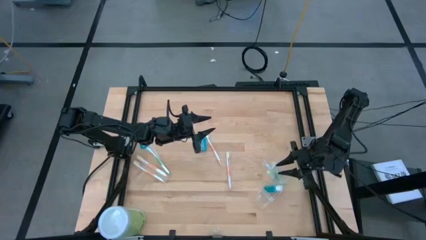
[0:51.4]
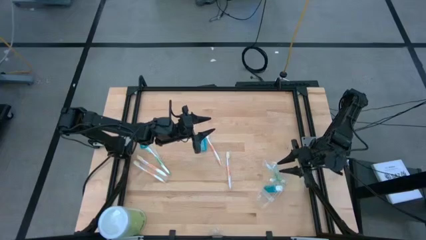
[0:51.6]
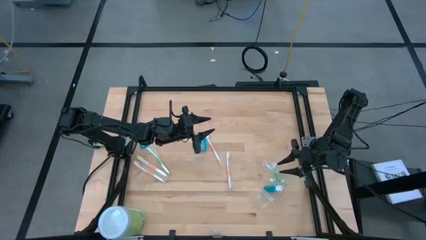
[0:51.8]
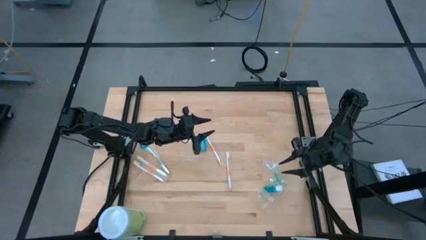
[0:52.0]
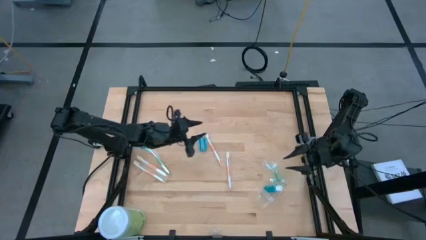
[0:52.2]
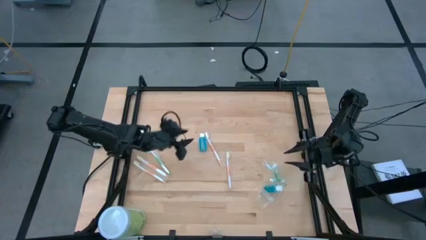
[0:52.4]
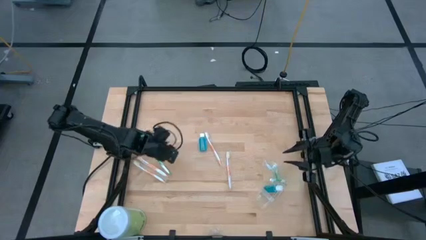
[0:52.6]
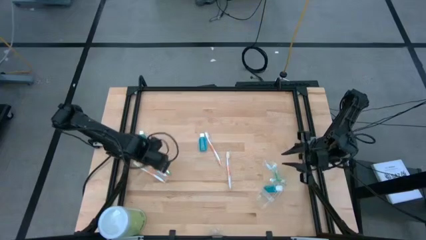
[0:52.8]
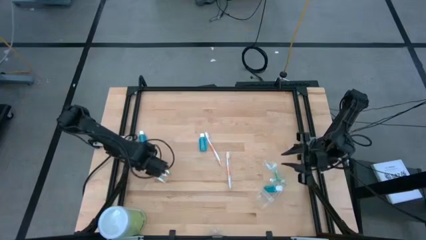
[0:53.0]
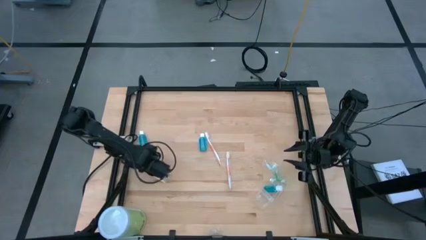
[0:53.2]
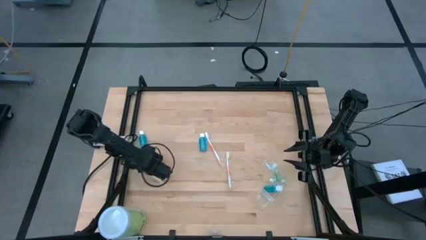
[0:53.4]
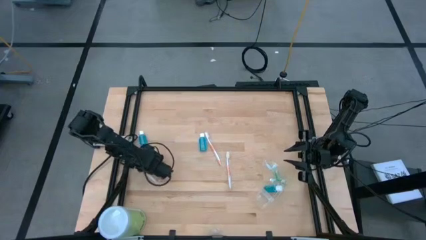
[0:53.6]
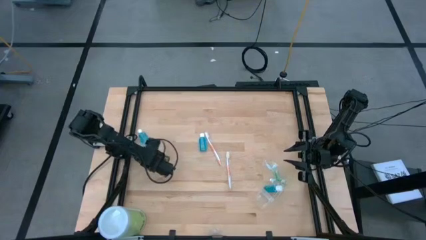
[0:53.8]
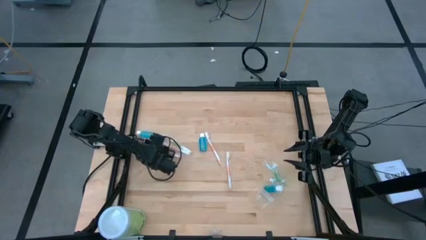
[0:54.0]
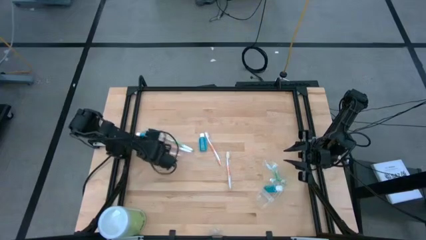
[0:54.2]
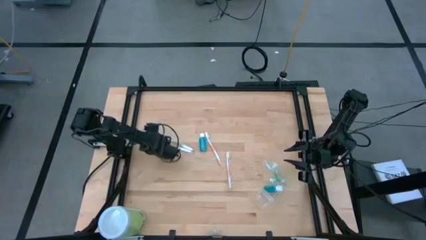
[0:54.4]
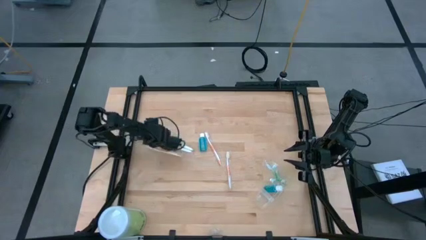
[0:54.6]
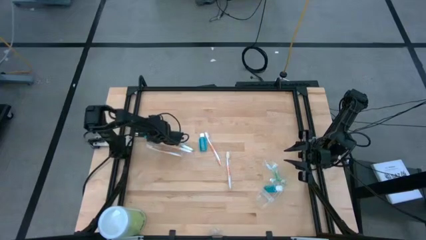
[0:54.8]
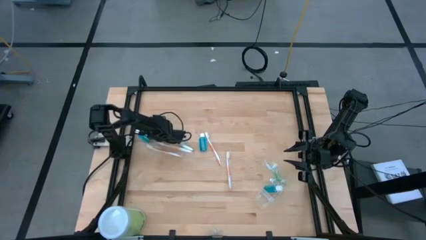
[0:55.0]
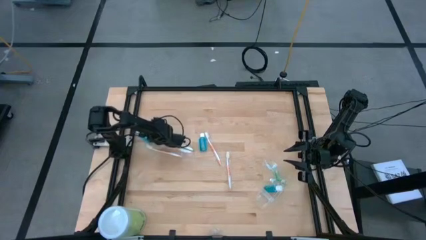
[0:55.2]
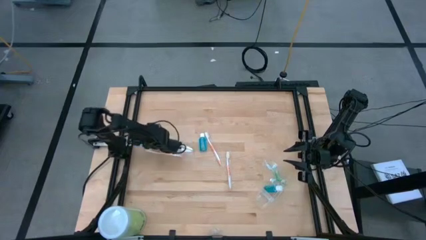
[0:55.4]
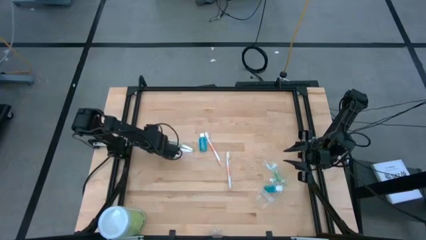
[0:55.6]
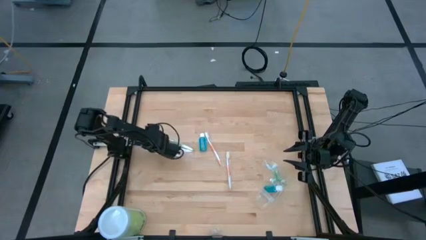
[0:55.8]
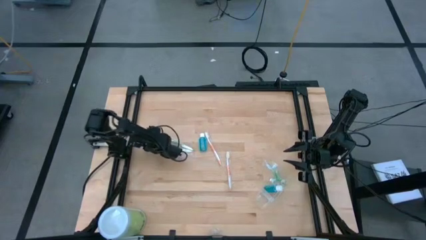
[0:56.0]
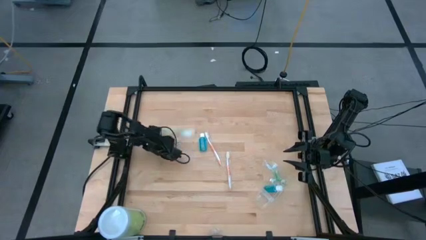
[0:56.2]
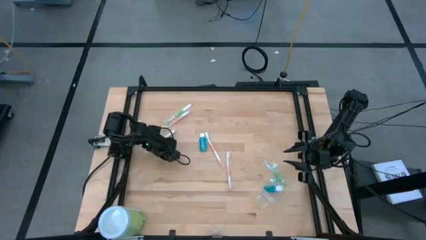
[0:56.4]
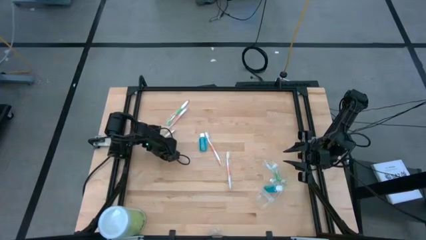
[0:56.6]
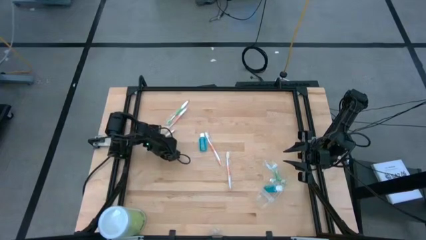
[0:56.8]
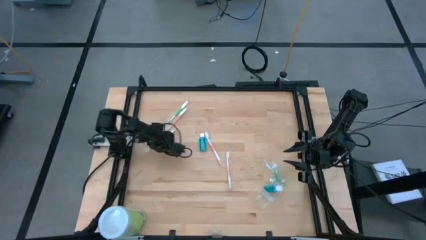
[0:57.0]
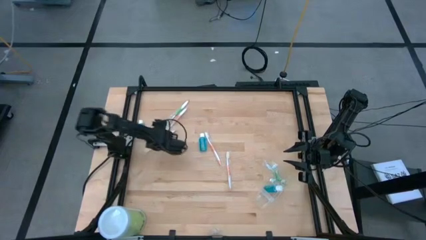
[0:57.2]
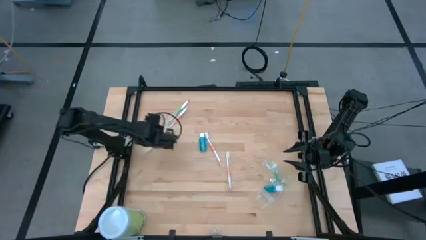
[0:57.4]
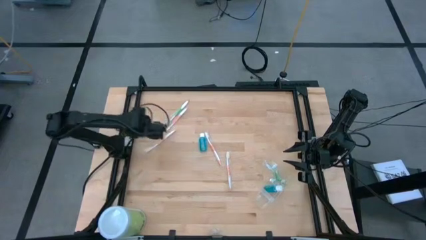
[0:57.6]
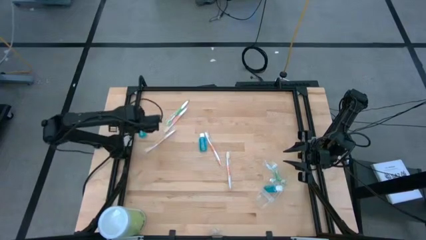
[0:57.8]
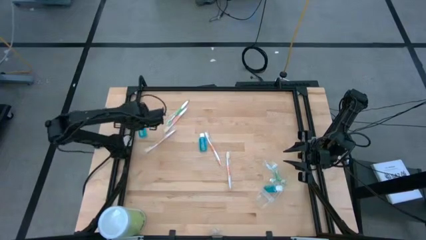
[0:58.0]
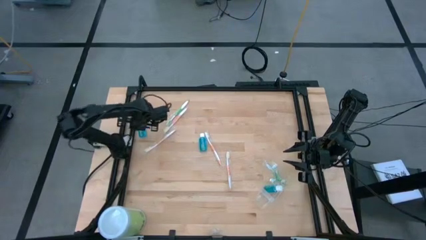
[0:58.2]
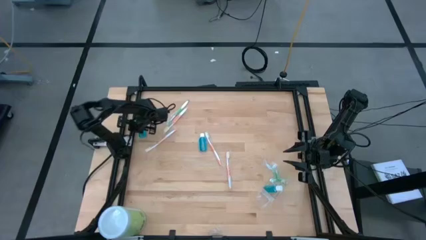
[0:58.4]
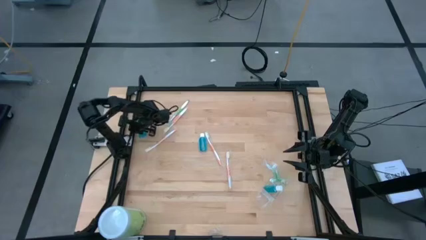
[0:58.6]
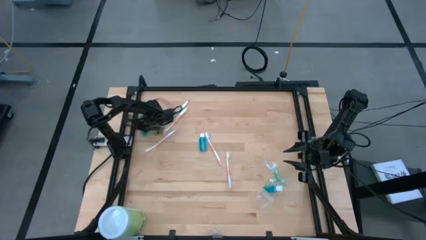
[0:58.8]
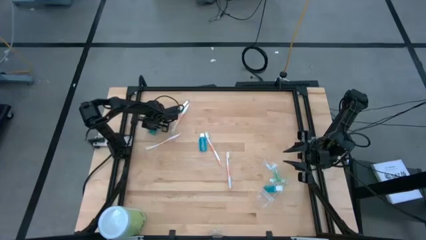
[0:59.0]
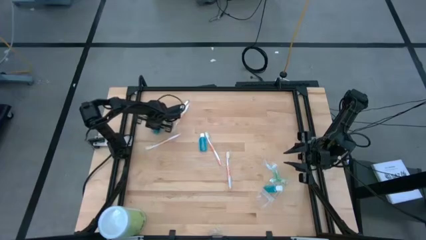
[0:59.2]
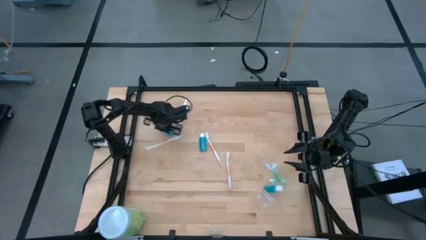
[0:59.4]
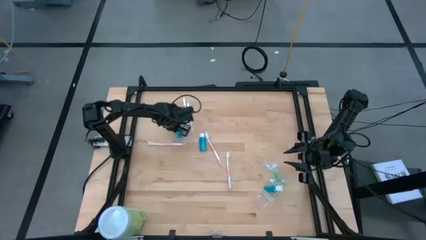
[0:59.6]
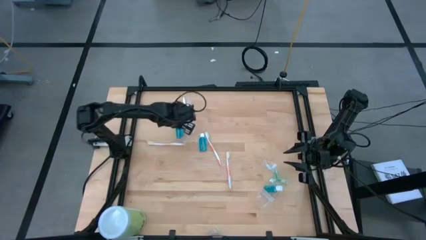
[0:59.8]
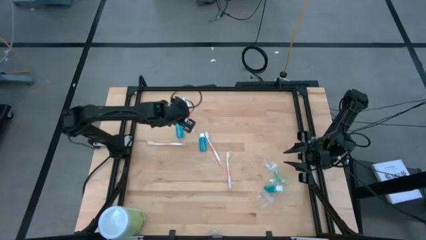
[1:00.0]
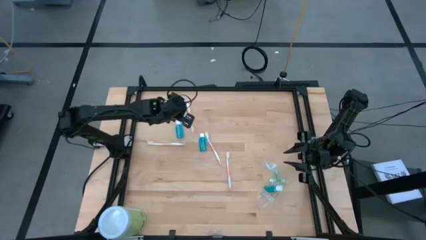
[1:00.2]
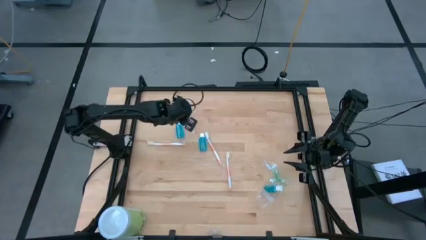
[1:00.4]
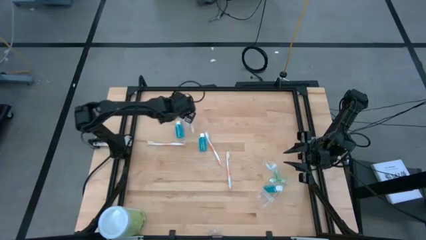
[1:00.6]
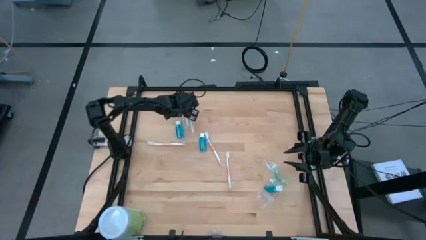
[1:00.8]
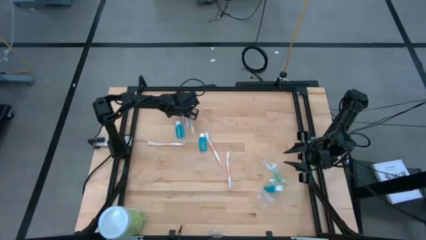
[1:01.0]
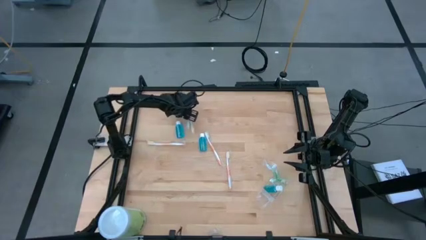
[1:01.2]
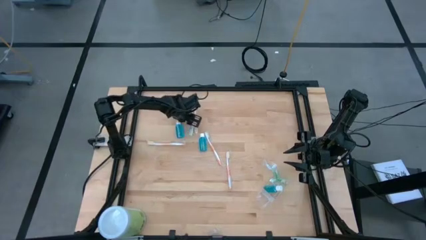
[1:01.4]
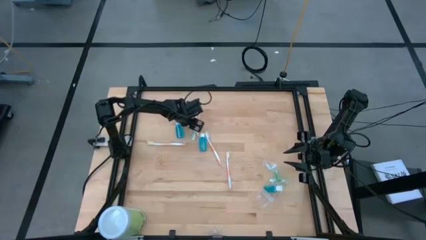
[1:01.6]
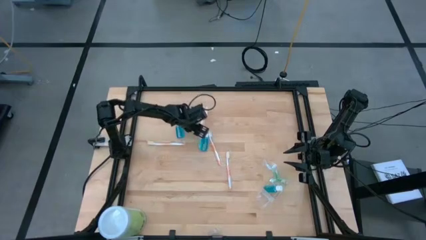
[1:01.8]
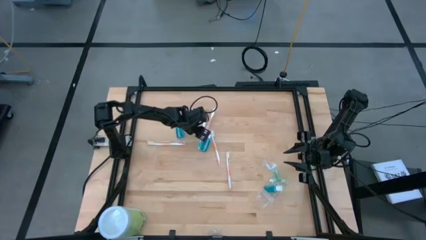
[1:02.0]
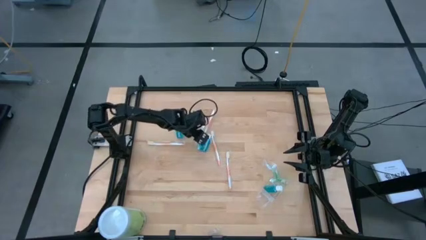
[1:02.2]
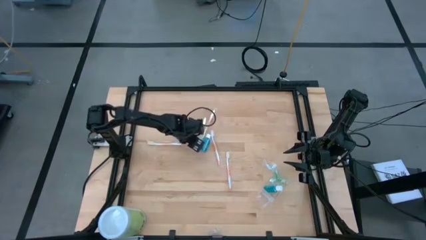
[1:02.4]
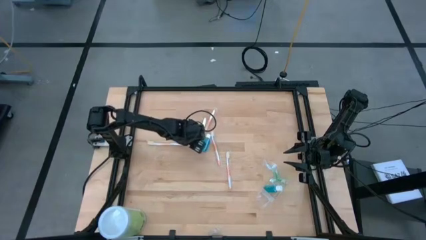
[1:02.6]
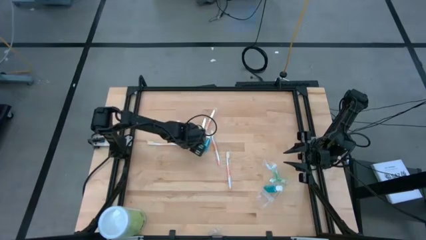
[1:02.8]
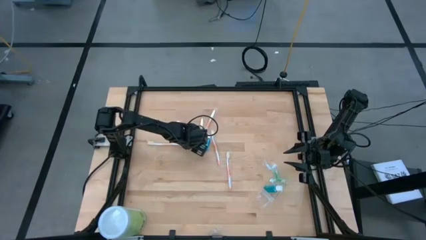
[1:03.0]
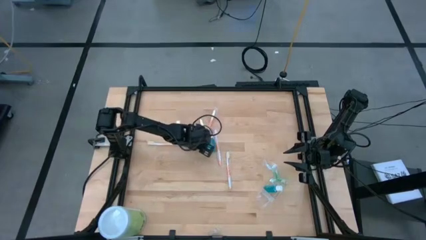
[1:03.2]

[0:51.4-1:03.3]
Task: Pick & Place toothbrushing station
Adjust the toothbrushes and the mouthwash on the table

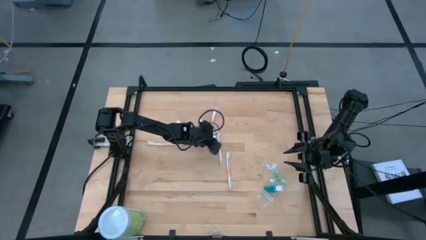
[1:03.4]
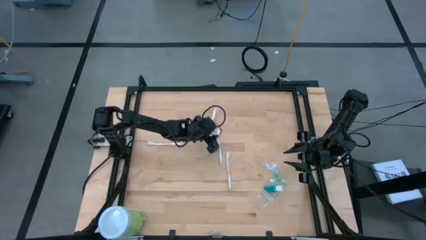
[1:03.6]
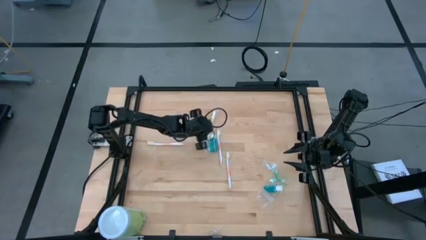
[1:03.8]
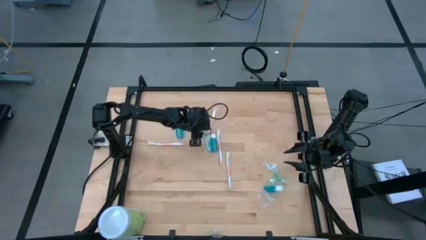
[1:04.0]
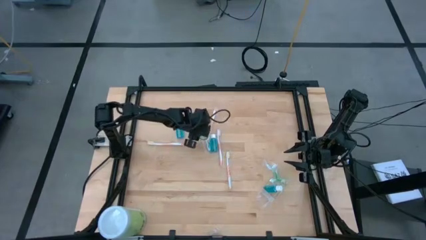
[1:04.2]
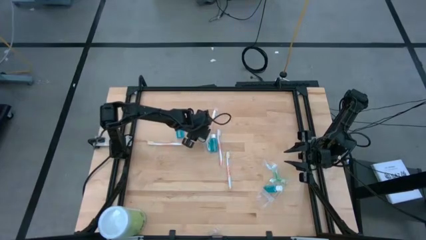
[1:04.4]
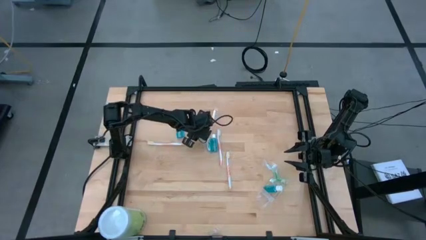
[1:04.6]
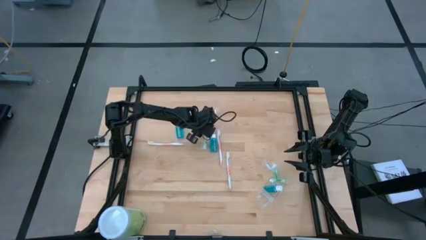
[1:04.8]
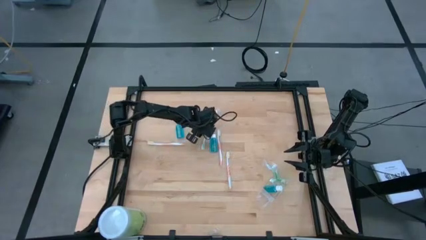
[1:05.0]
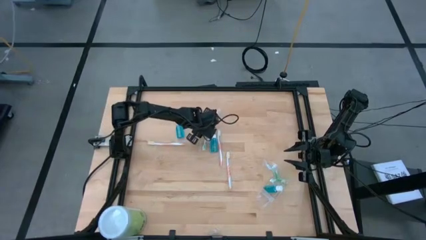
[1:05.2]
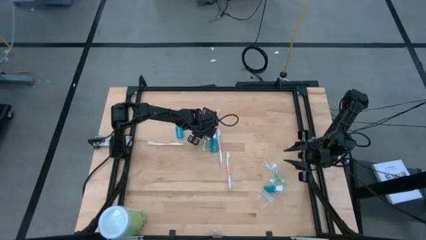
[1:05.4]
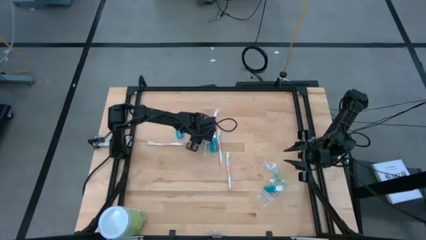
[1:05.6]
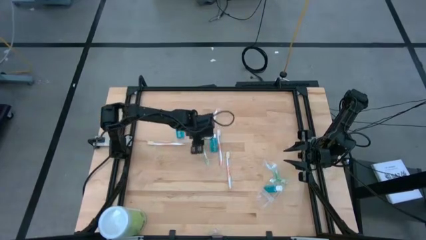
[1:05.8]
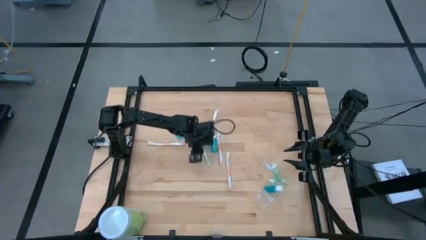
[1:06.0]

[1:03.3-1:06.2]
Put the green toothbrush into the top section of the transparent organizer
